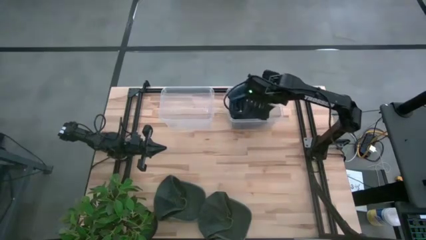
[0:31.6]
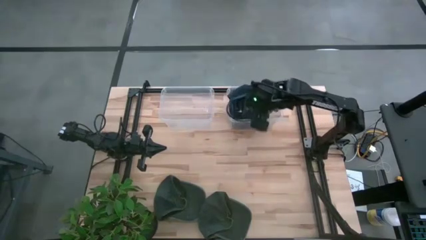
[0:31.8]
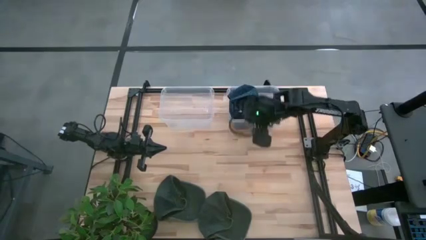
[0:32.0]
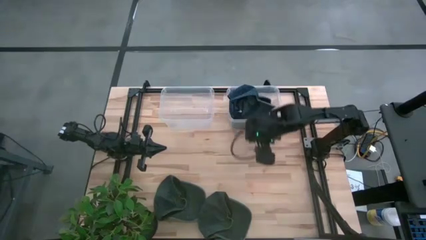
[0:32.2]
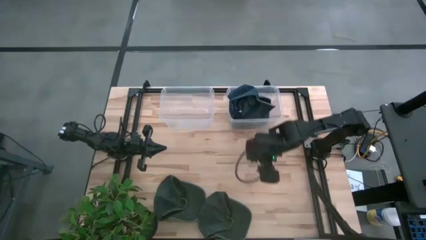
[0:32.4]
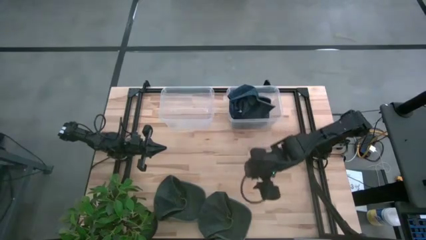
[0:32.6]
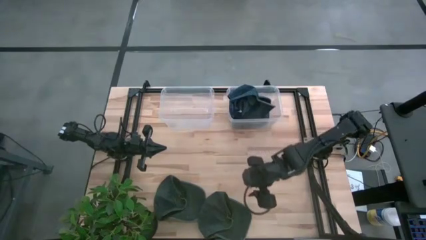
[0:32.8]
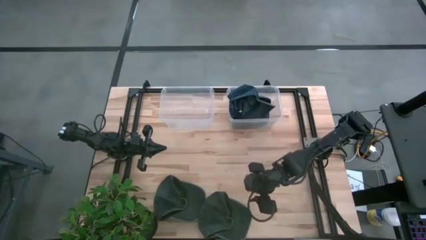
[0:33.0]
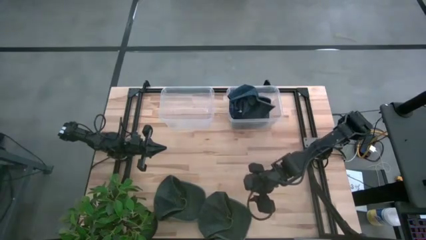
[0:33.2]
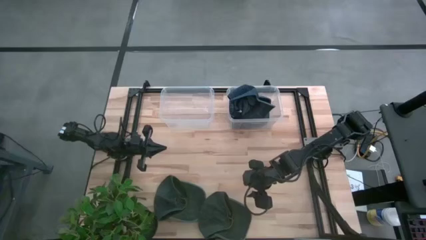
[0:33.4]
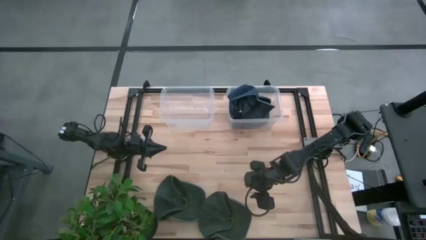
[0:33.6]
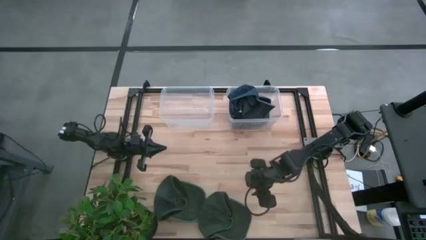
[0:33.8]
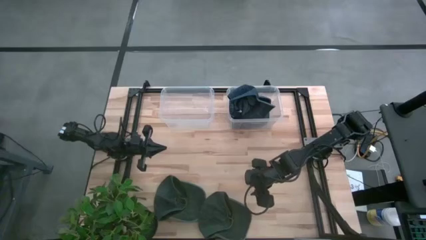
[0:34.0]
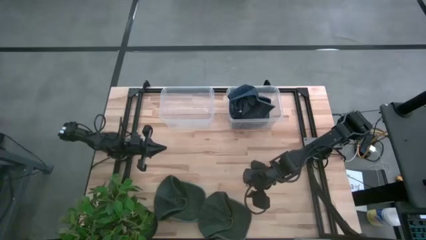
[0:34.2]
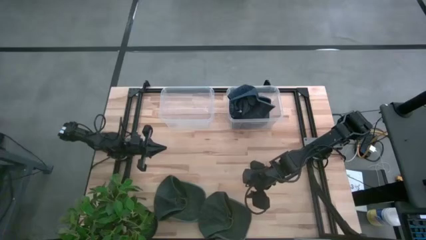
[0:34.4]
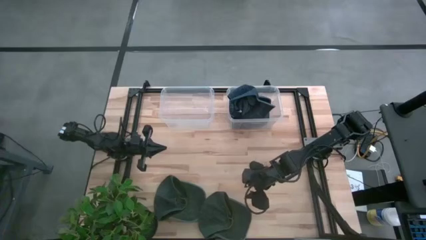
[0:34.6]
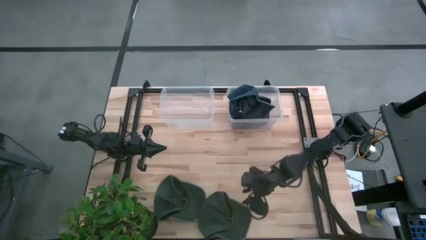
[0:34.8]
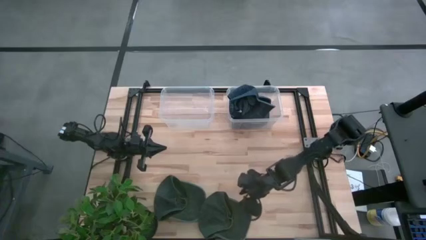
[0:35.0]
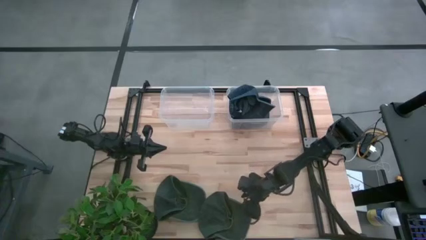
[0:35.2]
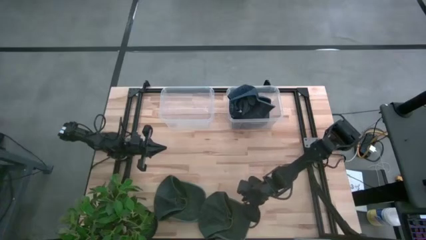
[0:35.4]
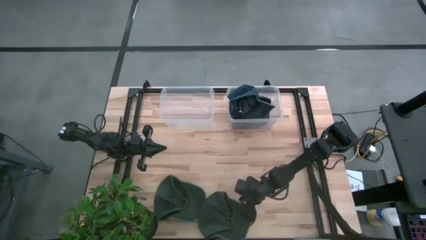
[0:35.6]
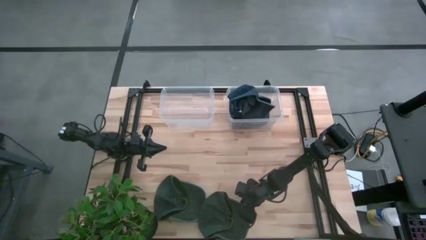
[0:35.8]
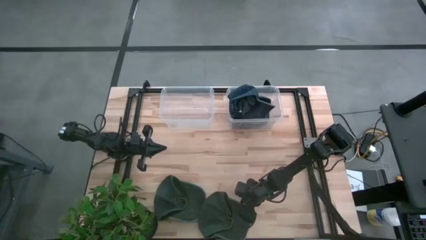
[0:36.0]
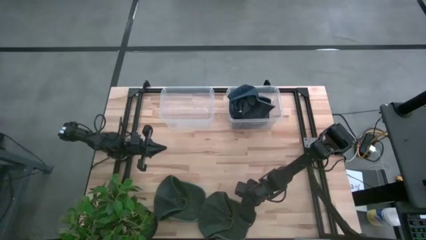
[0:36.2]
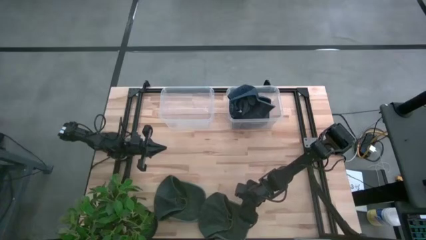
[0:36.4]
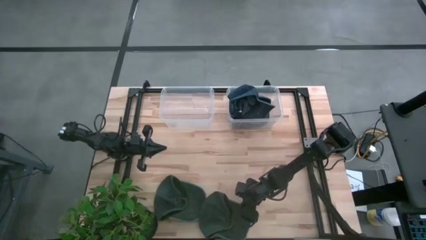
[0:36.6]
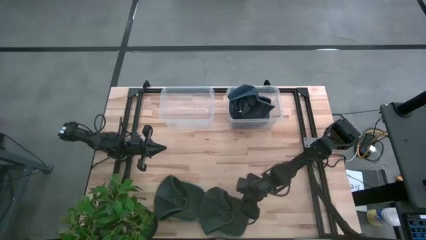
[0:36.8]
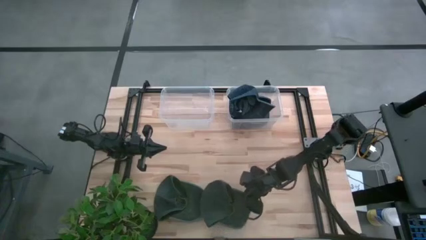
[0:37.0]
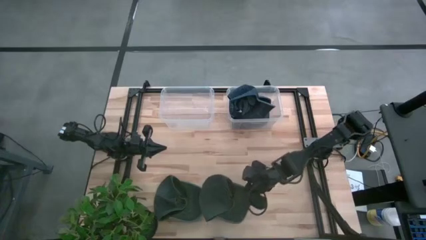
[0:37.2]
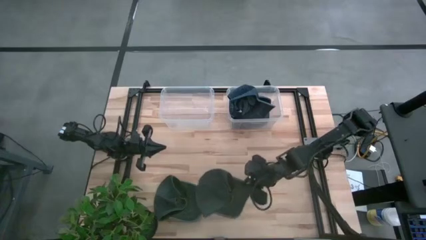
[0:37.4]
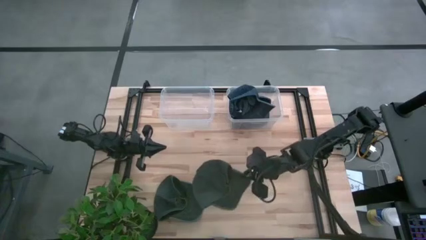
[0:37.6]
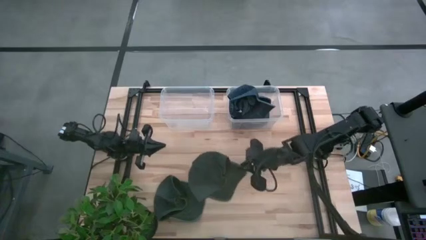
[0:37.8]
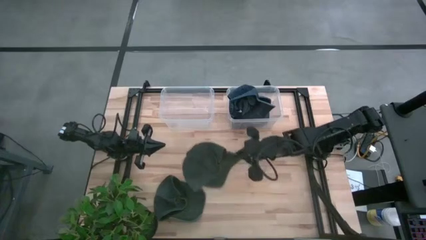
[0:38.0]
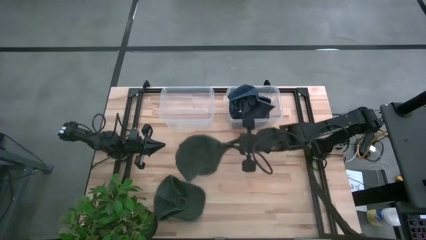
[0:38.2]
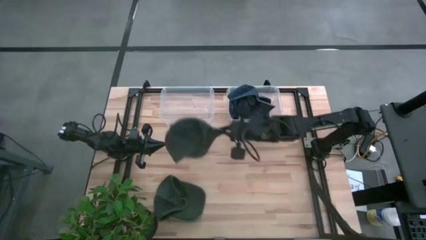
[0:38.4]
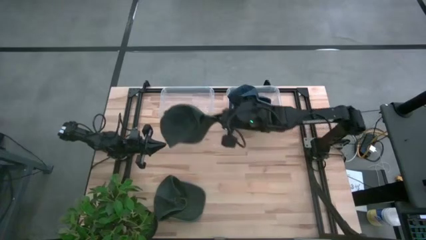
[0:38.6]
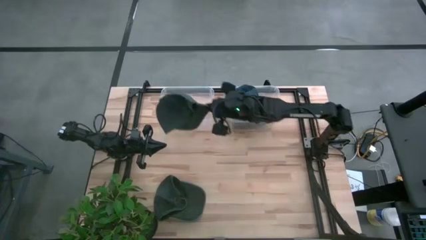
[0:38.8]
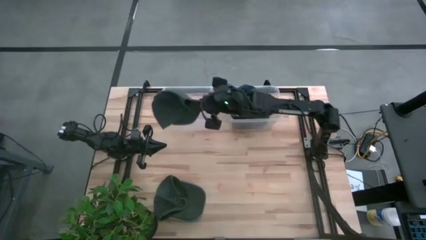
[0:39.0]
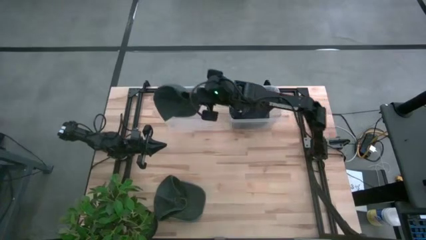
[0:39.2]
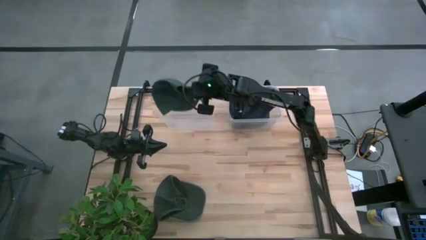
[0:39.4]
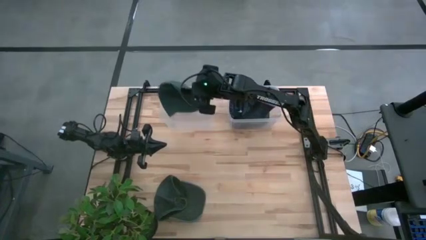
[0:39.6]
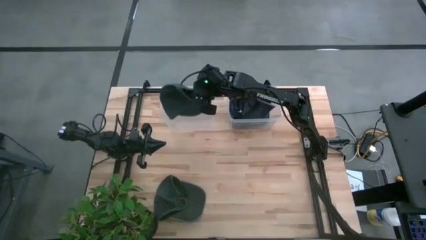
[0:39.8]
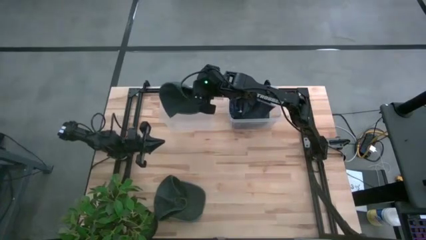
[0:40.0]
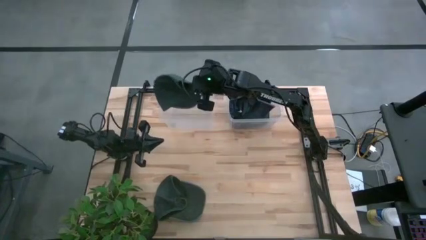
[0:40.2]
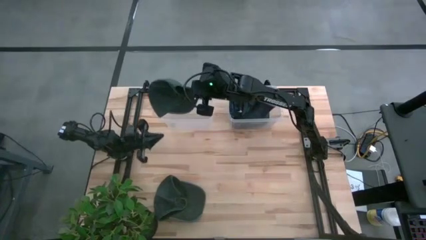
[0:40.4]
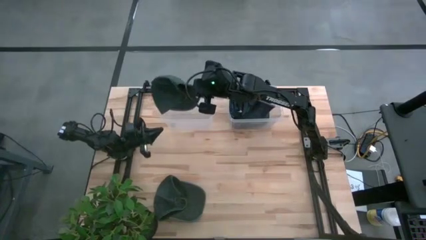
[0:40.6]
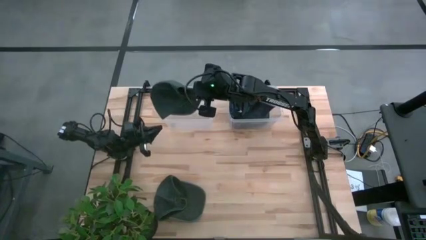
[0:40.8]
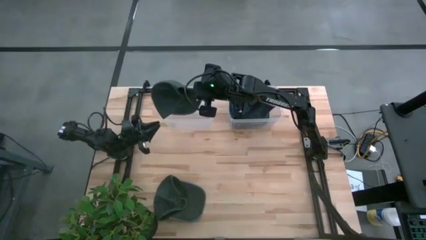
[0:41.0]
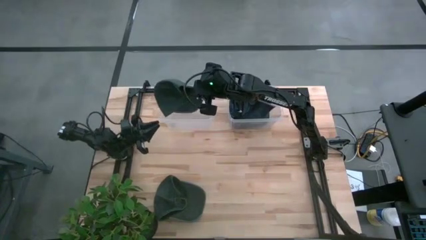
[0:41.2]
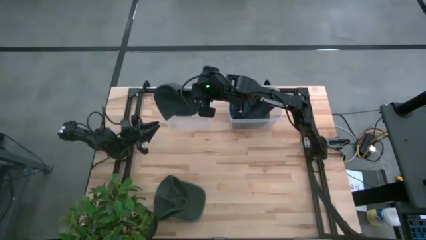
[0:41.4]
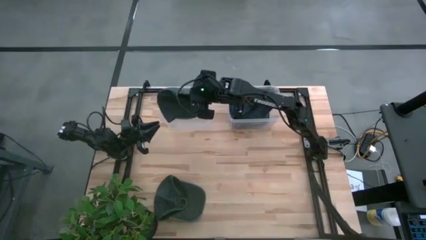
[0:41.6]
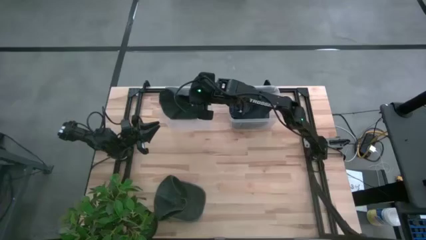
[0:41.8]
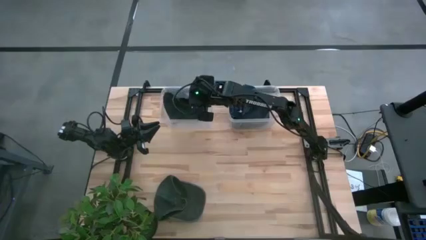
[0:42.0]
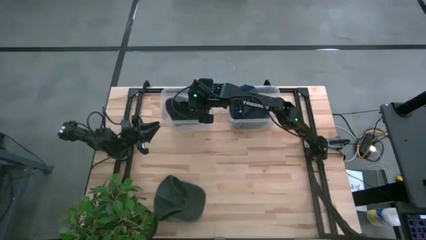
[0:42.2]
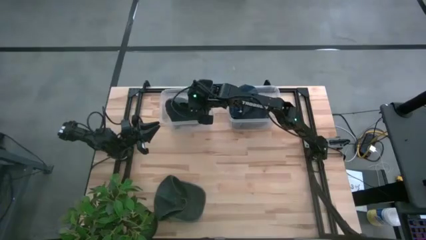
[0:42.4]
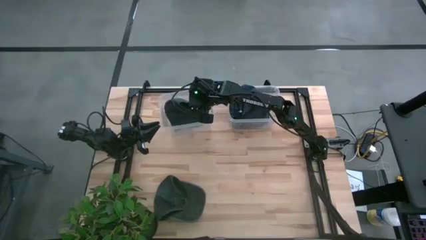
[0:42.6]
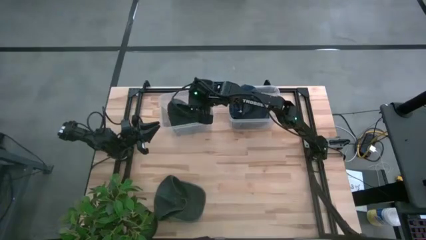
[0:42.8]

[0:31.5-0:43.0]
Task: Pick & Place hat
Put the right gray cap into the left transparent bin

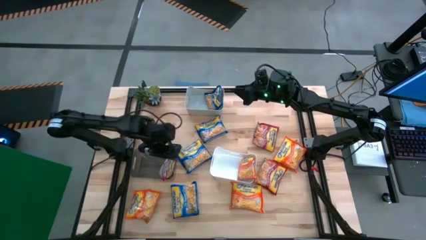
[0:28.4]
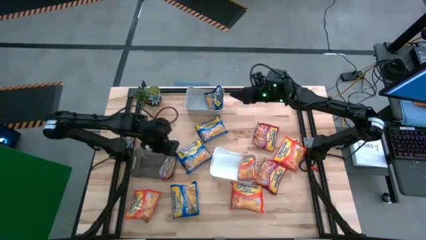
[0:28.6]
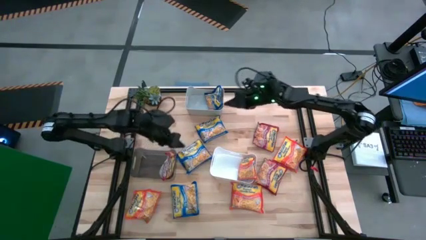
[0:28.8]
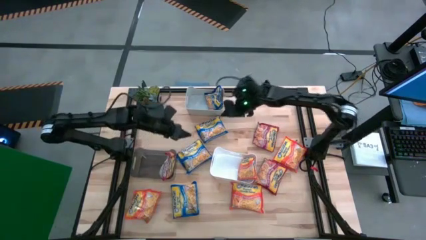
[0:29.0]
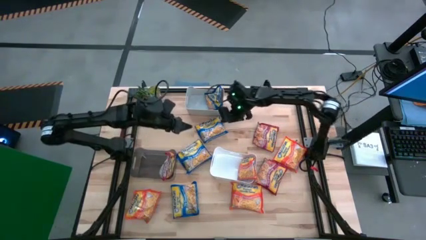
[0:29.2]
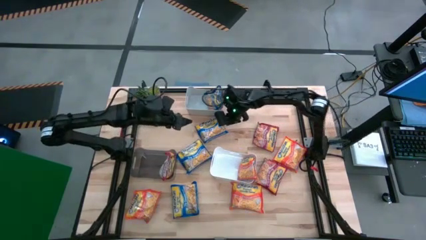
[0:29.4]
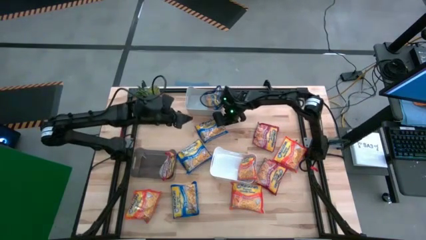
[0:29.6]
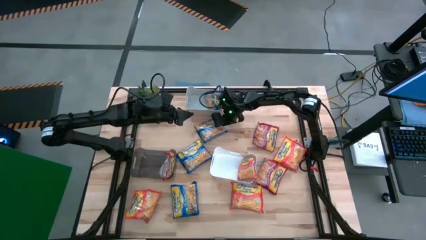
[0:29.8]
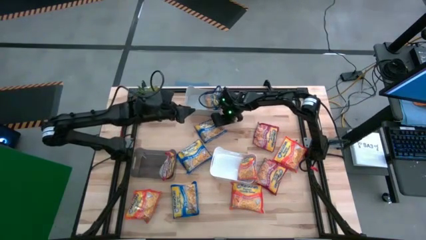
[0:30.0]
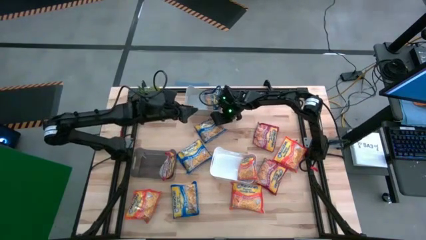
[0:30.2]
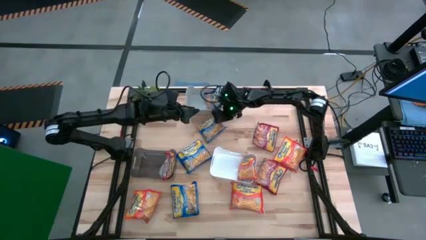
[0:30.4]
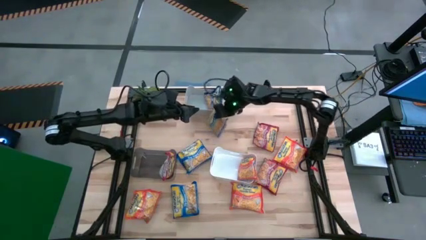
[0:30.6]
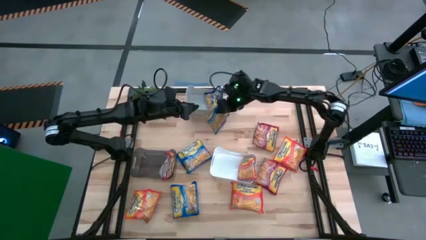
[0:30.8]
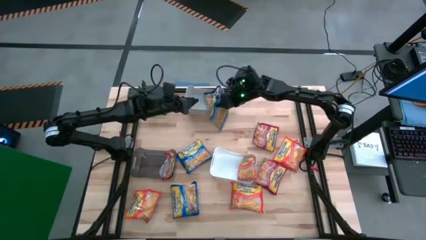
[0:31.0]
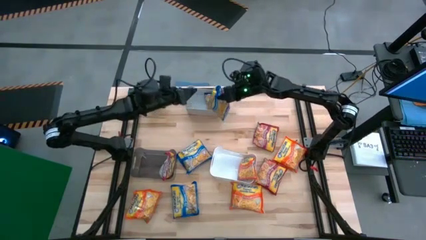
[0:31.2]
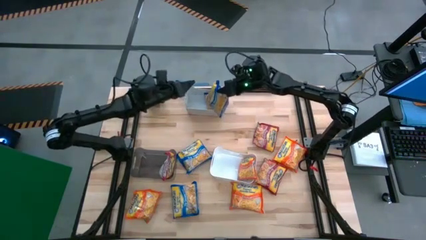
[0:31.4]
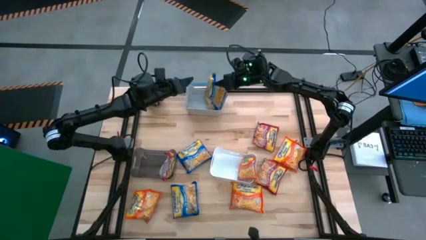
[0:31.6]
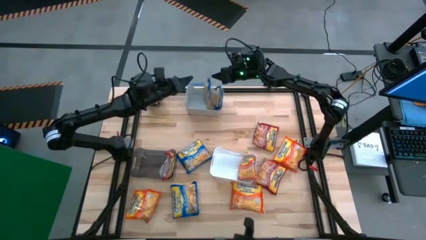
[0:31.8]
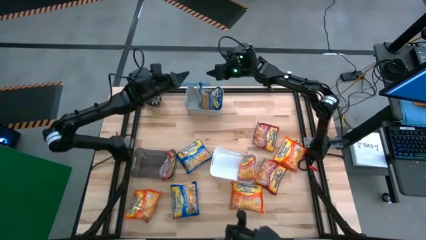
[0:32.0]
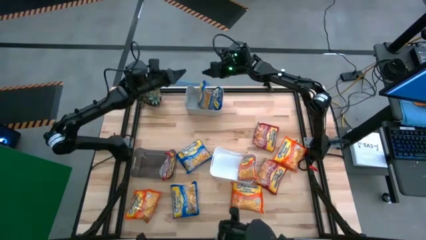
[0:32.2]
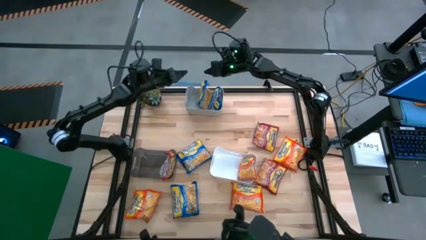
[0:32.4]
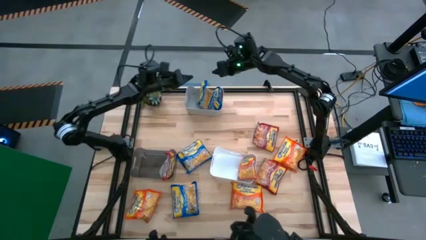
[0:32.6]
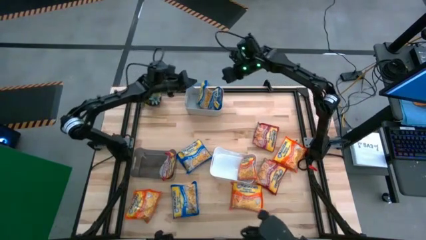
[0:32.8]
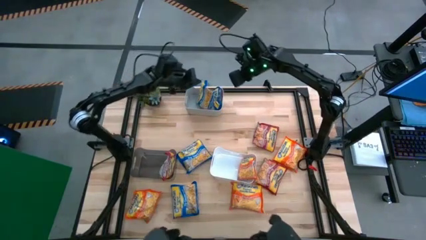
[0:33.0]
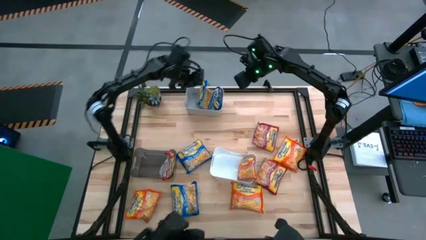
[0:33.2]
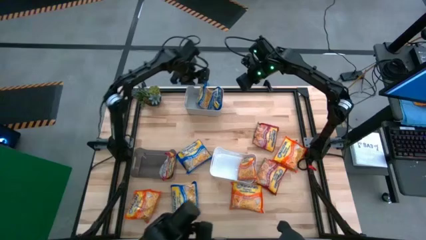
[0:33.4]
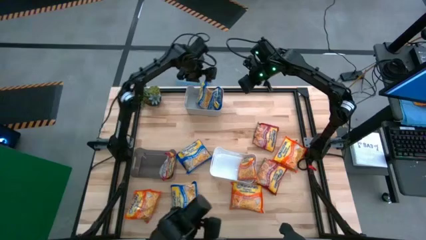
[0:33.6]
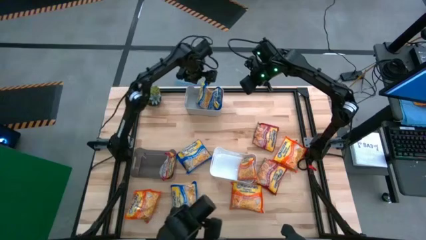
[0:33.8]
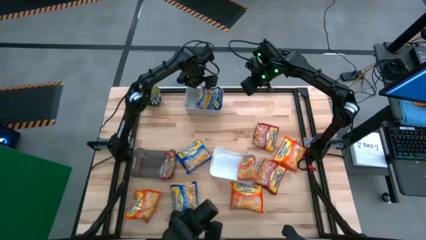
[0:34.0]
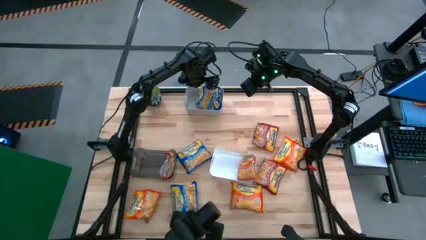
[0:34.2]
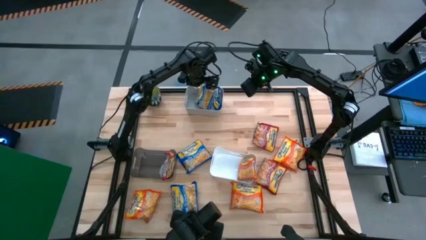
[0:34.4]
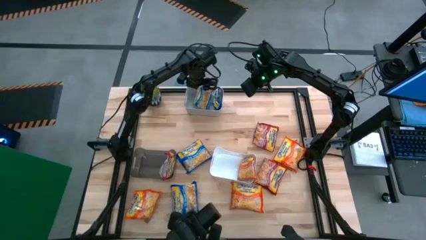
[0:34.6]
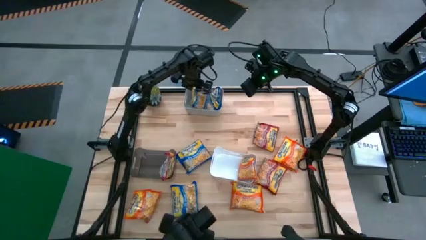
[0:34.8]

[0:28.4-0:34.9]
Task: Sort Maruchan noodles
Put the blue noodle pack into the gray bin
